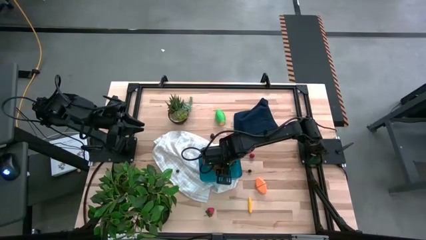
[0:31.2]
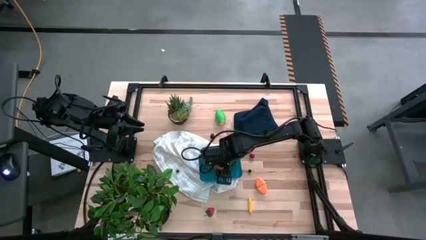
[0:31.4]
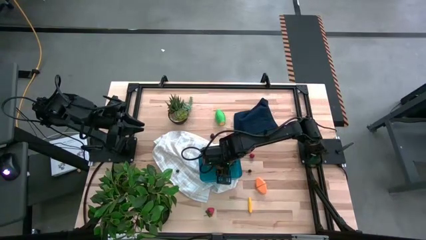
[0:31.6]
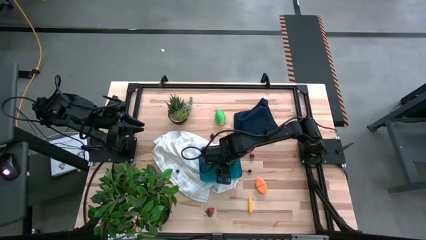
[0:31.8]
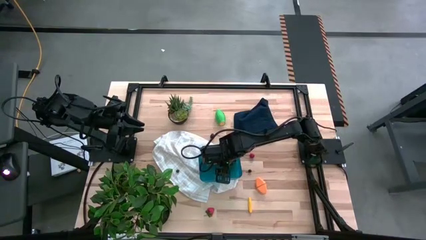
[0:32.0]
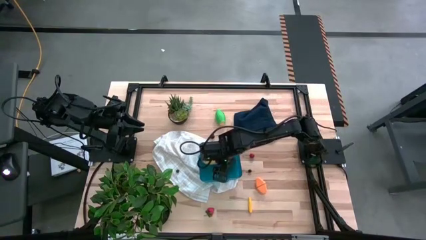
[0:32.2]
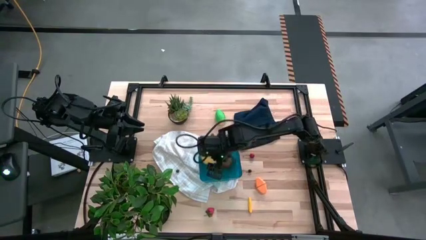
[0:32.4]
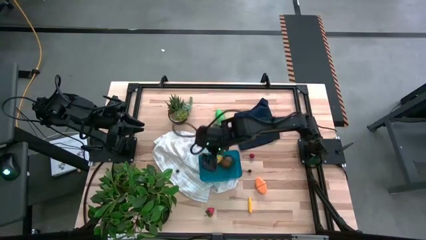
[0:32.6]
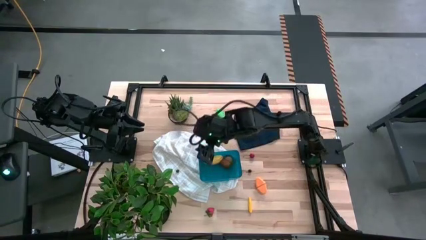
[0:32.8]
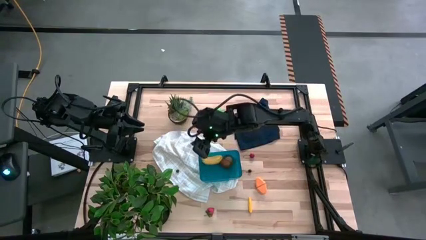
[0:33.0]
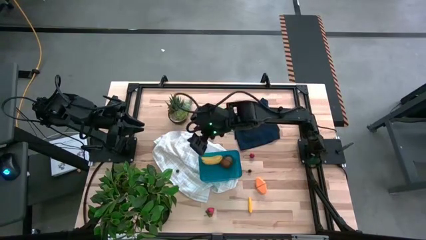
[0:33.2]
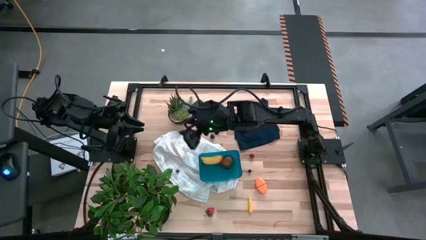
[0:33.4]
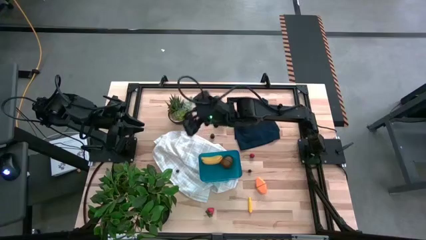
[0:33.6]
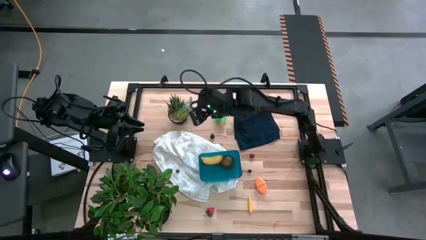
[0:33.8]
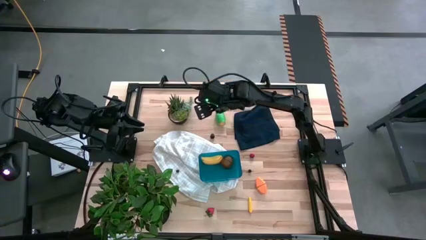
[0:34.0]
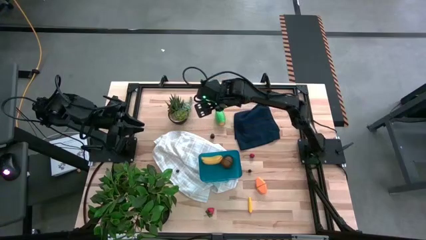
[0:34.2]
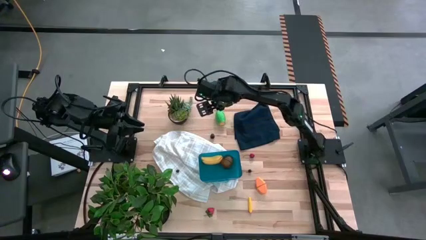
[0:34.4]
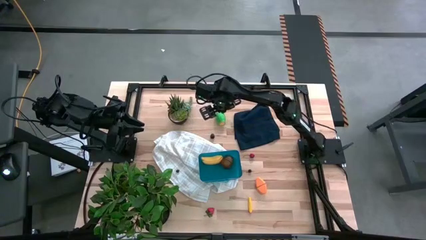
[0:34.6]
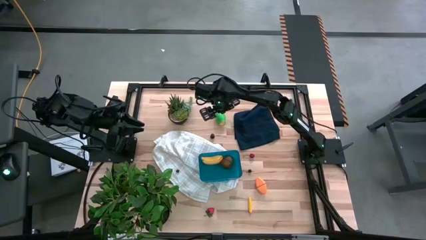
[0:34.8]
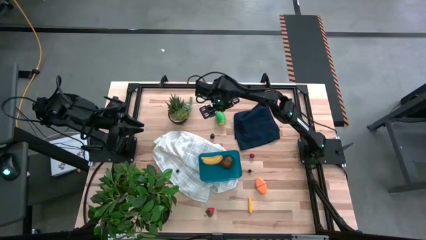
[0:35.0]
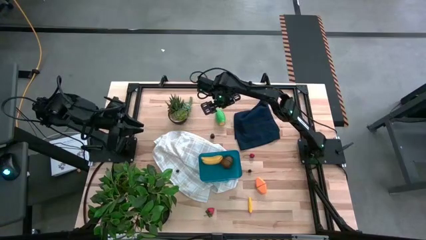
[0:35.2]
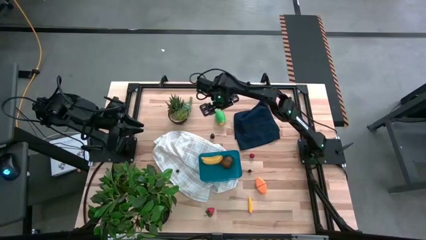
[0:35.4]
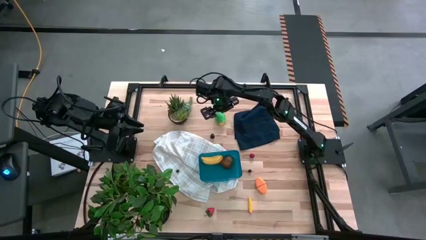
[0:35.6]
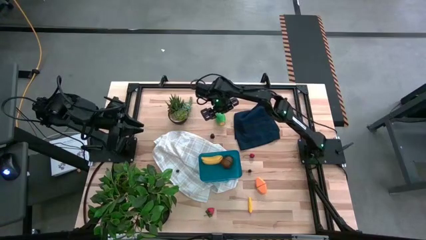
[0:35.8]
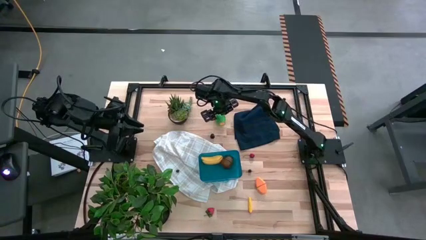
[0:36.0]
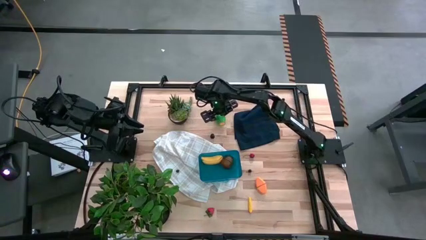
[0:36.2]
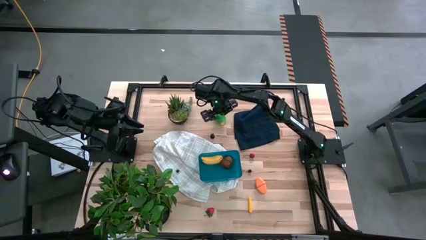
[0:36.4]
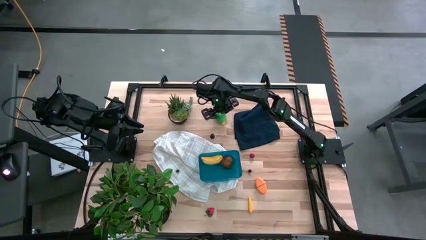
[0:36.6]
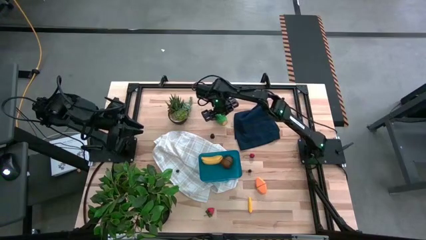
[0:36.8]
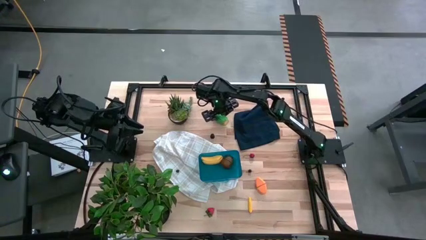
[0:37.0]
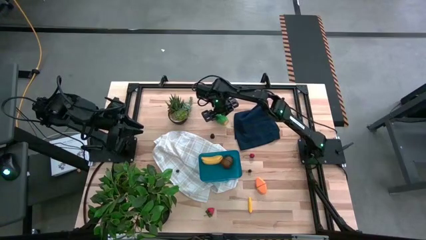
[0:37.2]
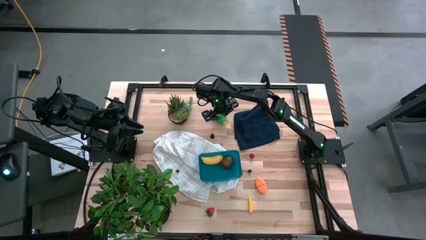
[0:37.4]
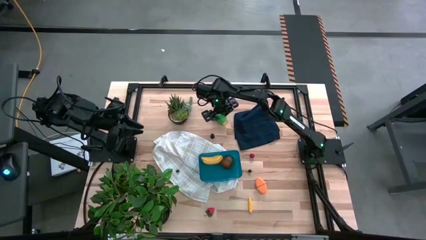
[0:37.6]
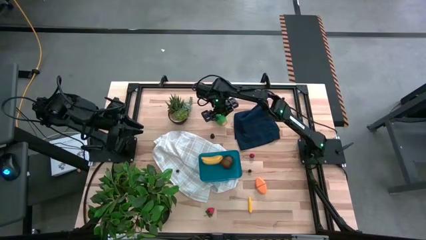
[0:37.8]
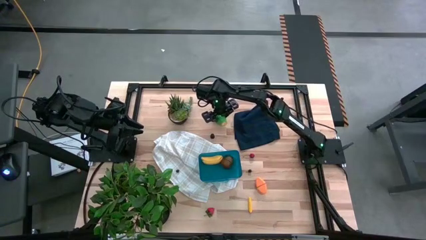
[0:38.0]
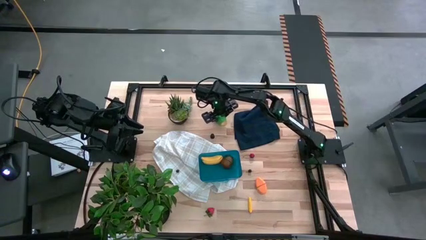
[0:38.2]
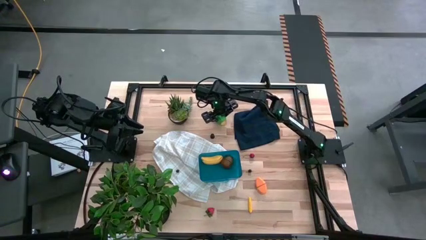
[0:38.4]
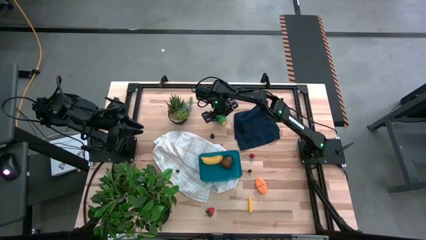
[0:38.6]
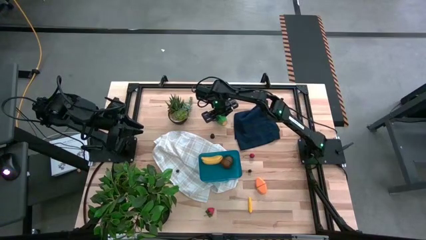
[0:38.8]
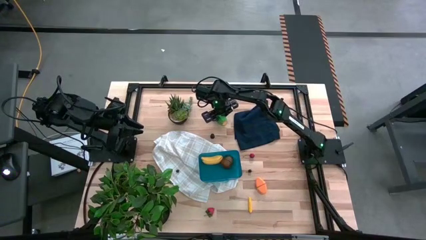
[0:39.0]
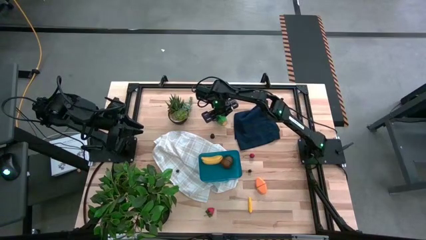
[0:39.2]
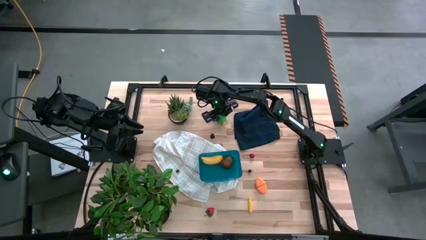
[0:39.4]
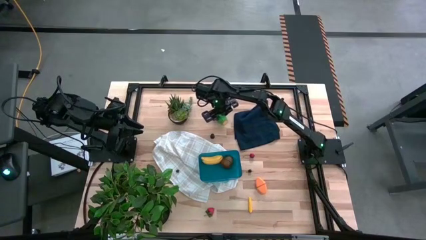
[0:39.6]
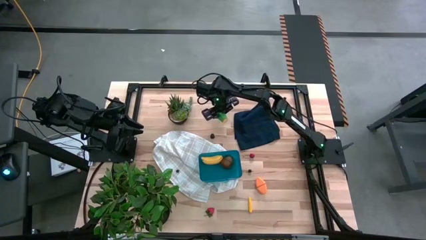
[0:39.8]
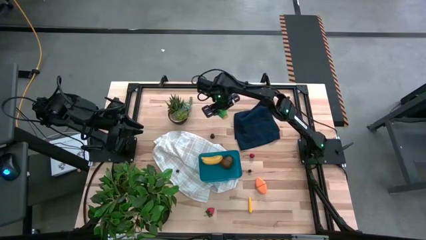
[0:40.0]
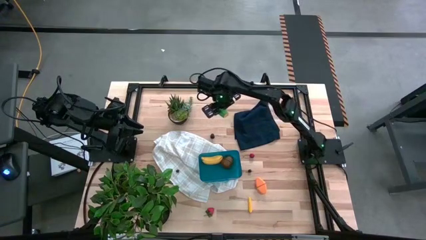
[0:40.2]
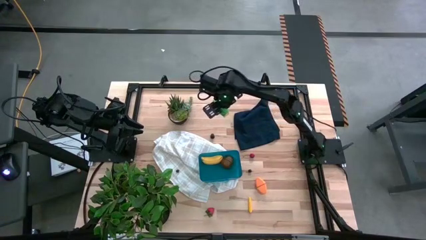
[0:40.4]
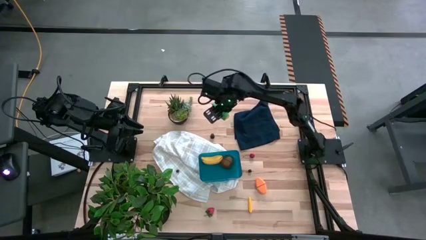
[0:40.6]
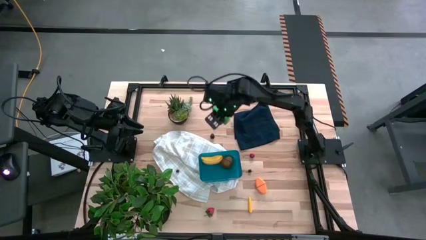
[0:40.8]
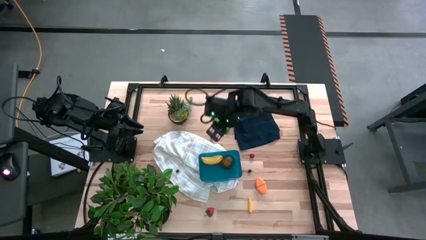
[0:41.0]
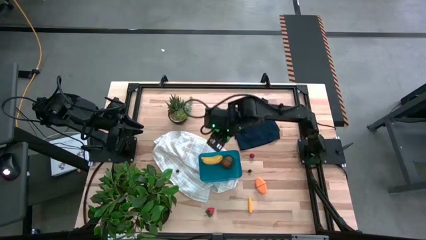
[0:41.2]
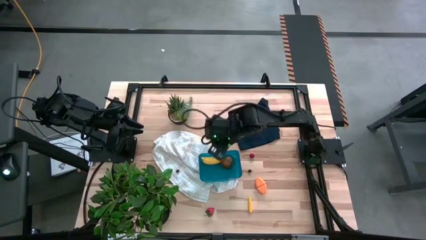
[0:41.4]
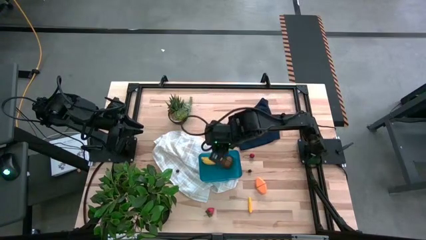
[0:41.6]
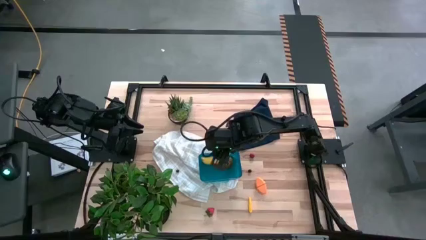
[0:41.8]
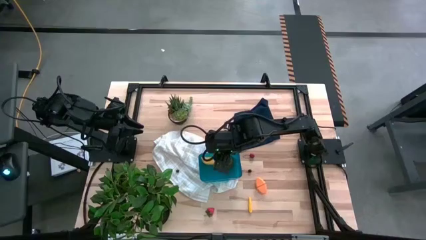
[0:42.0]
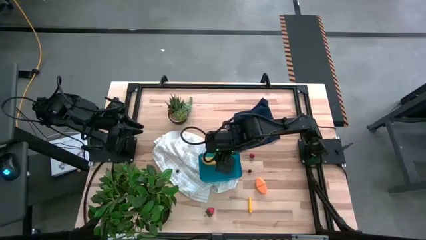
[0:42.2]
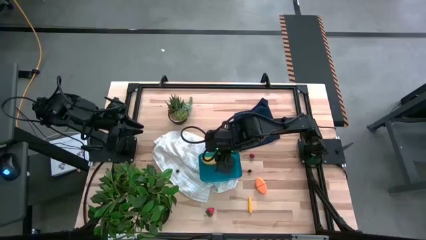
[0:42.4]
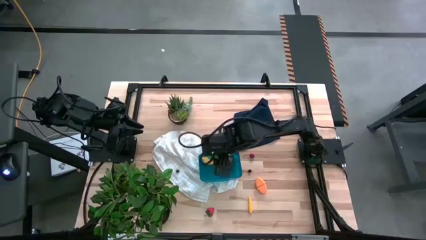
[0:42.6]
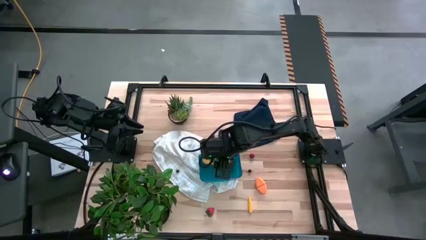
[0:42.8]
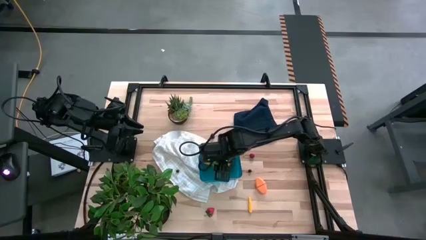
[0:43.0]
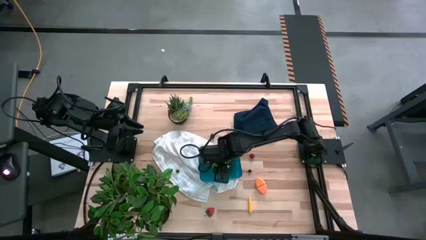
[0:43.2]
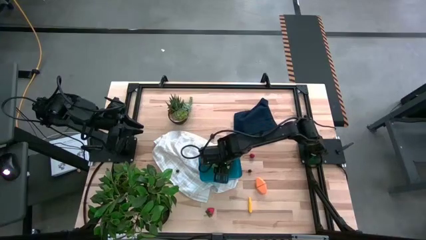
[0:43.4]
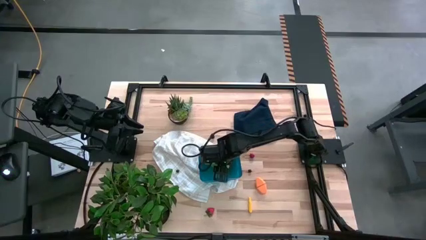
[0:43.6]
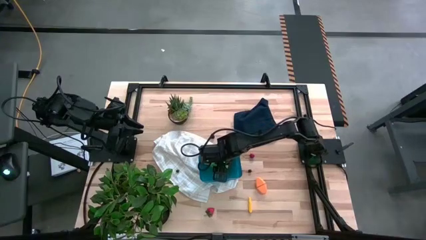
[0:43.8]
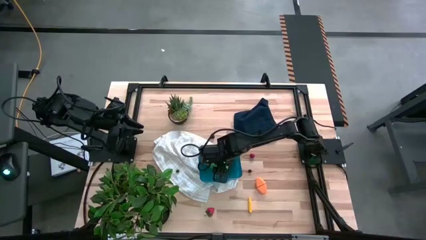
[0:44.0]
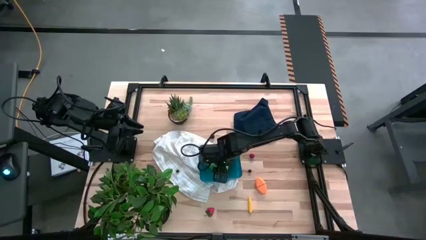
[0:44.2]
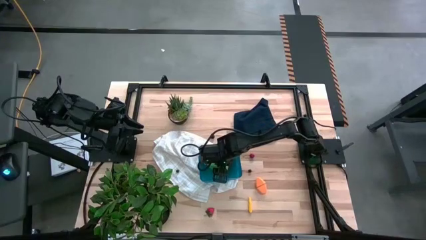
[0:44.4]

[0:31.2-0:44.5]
Task: Pick and placing Produce into tupperware
Put the green corn into the blue bin
